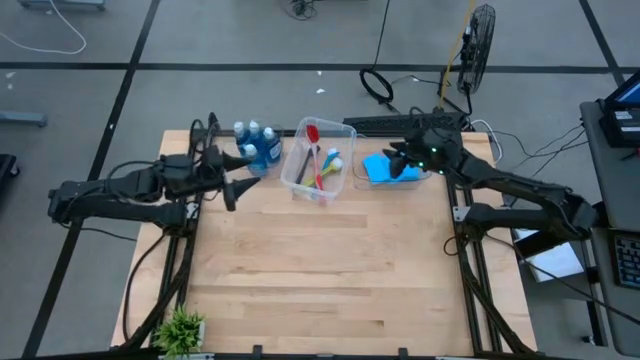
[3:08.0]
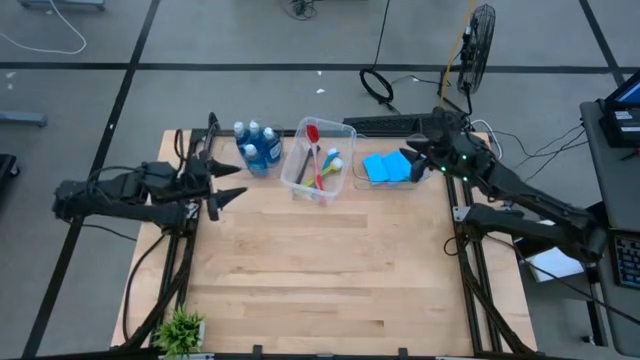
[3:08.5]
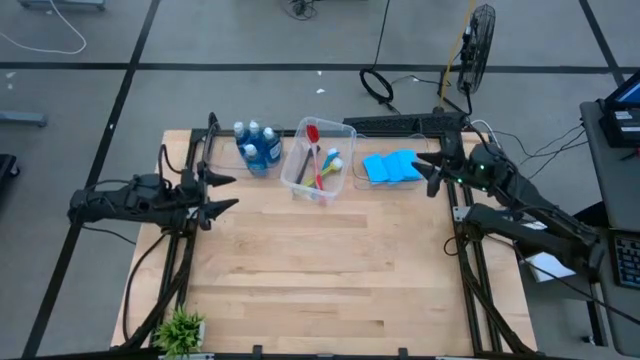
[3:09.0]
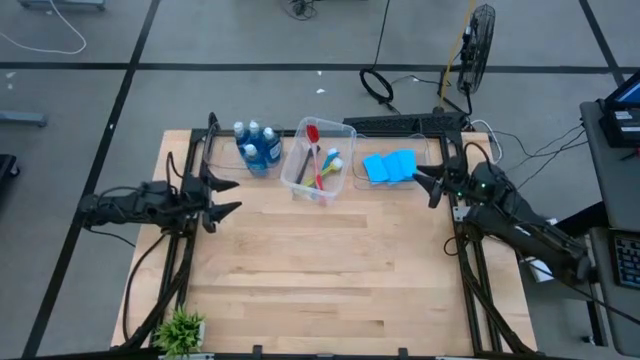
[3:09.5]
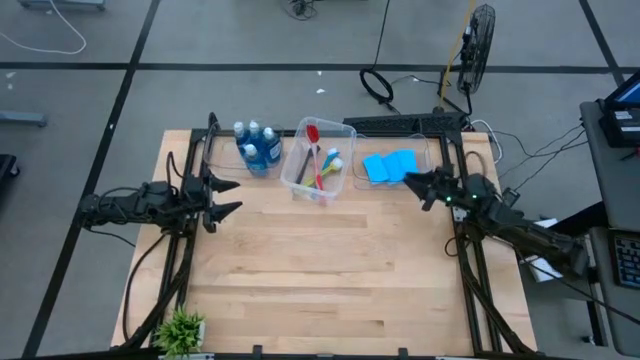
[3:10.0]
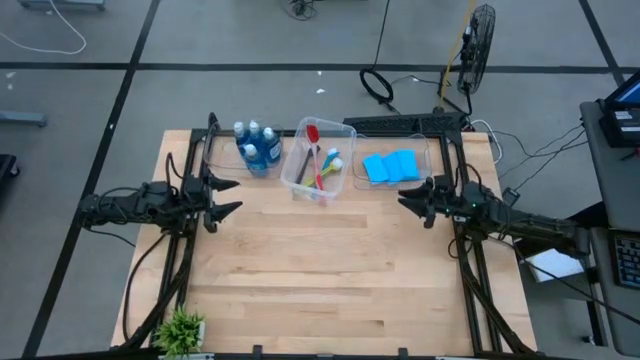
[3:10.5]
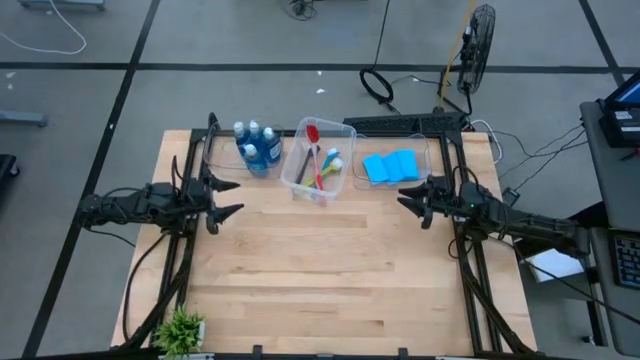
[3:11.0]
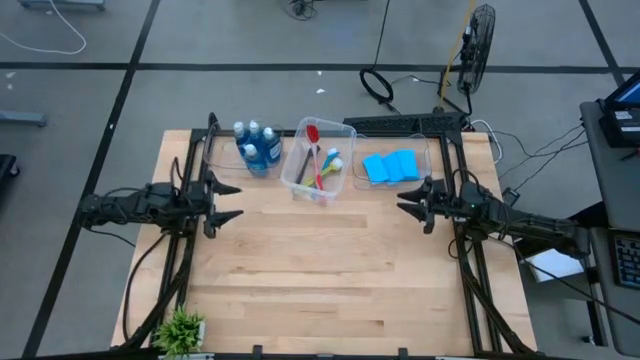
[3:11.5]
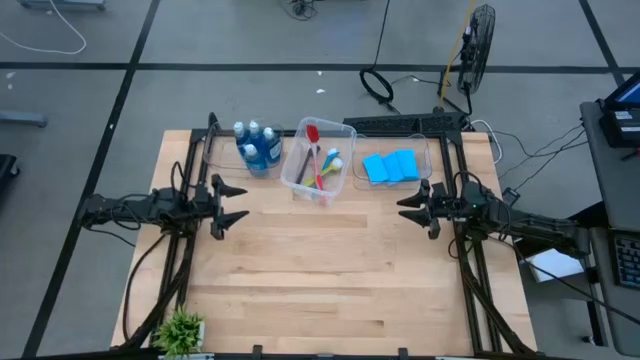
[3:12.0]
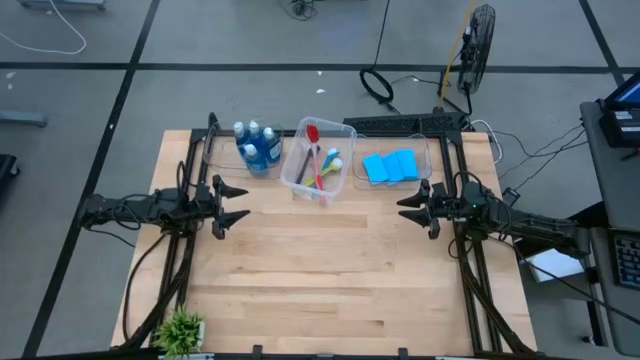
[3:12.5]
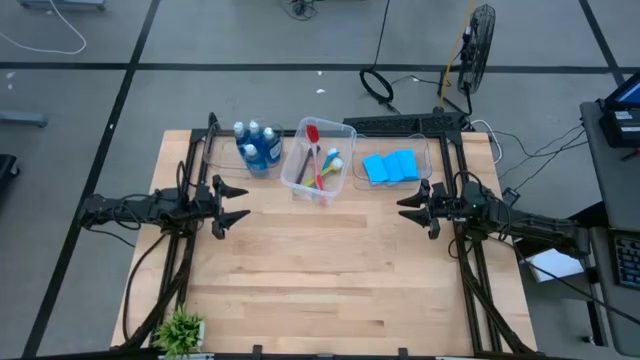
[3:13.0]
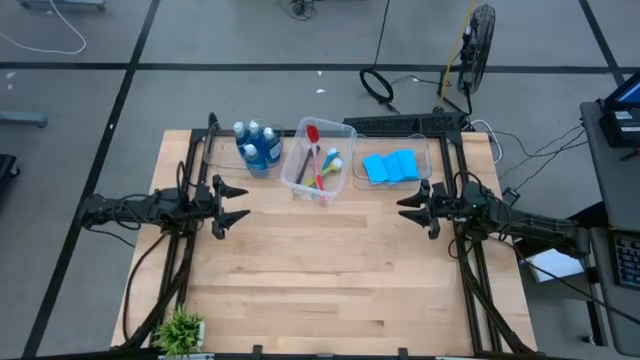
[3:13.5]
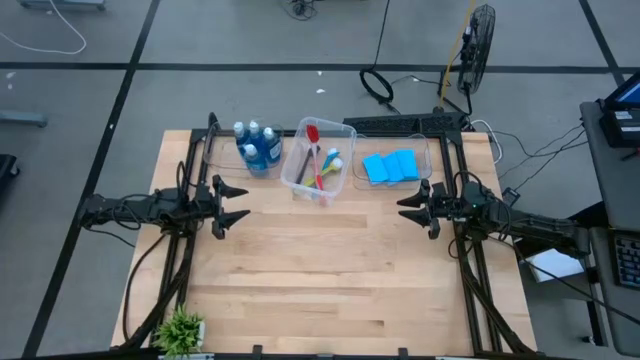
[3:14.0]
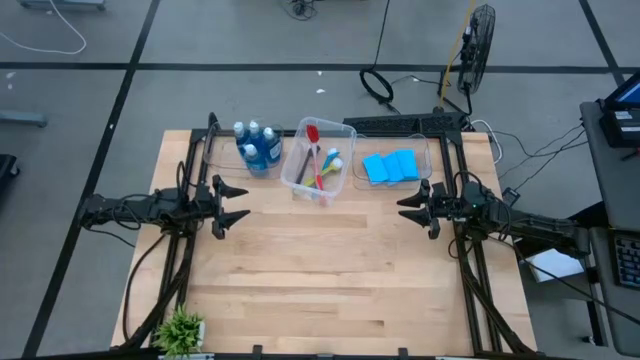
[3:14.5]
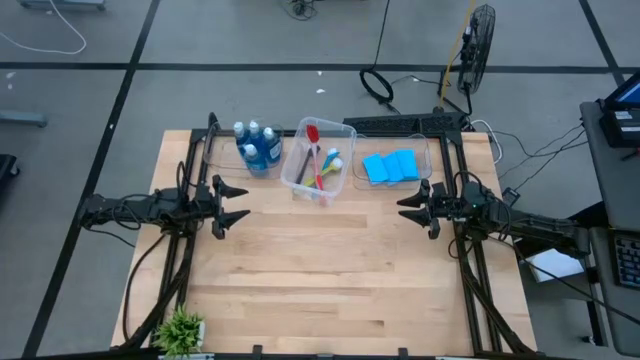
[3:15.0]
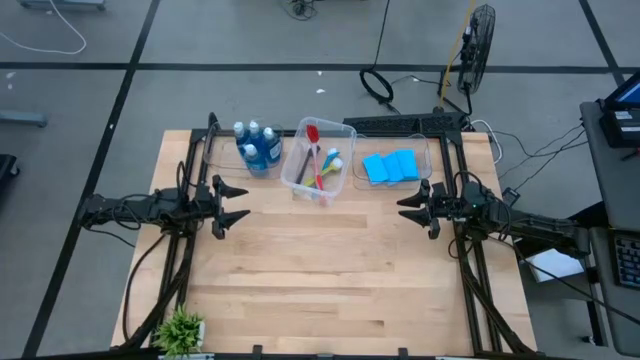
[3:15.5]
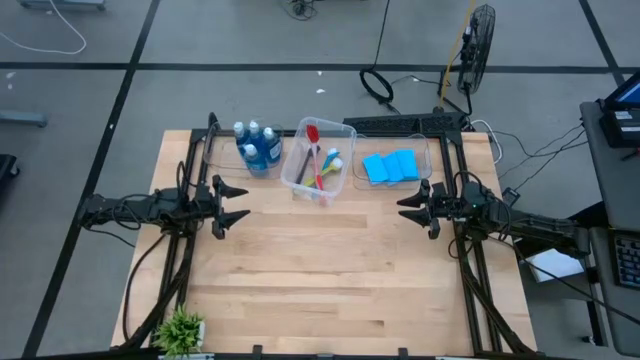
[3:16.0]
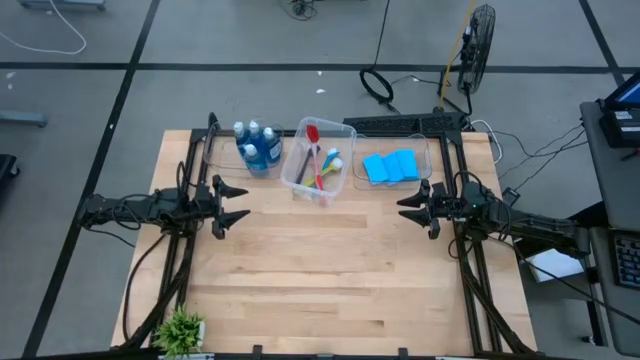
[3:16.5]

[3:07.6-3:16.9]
Task: Pick & Place Kitchen Sink Supplies
Return to Home Position

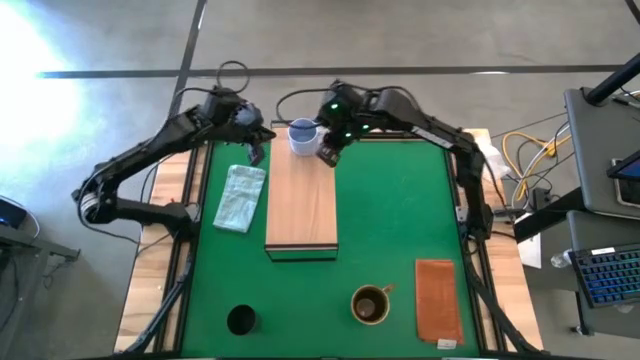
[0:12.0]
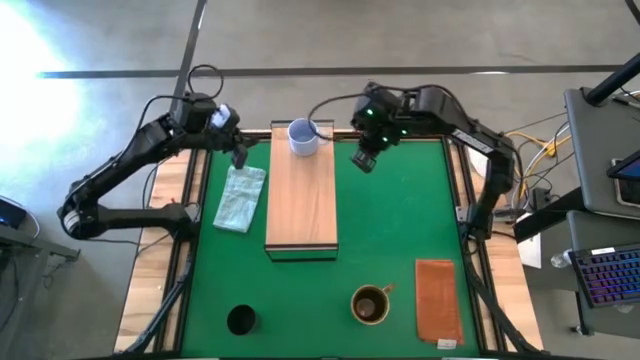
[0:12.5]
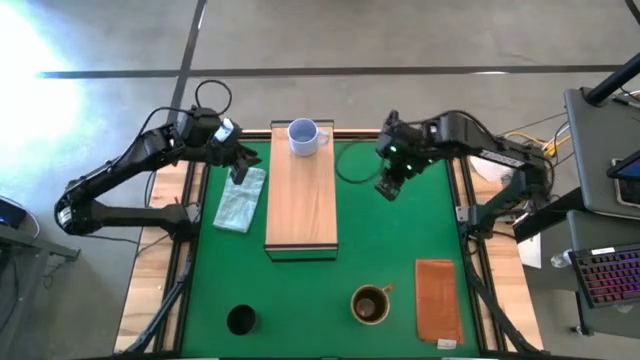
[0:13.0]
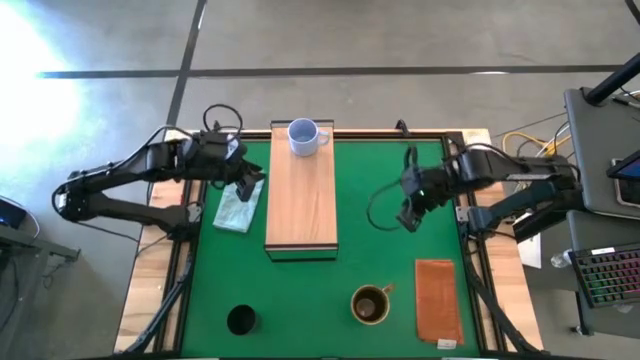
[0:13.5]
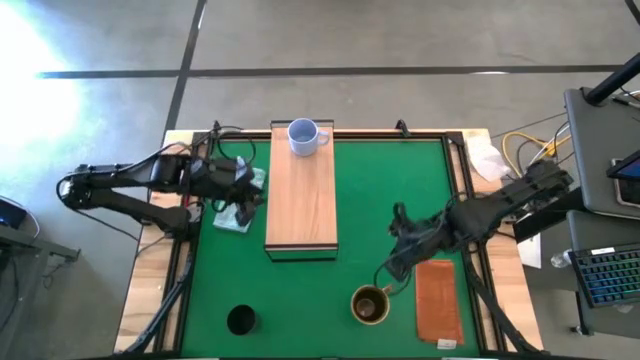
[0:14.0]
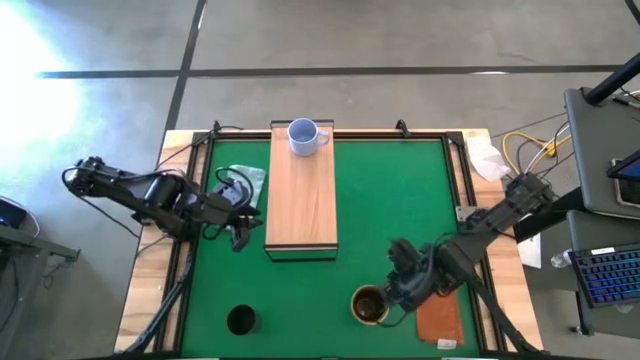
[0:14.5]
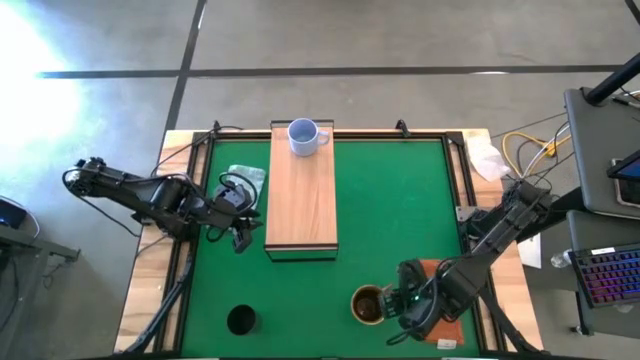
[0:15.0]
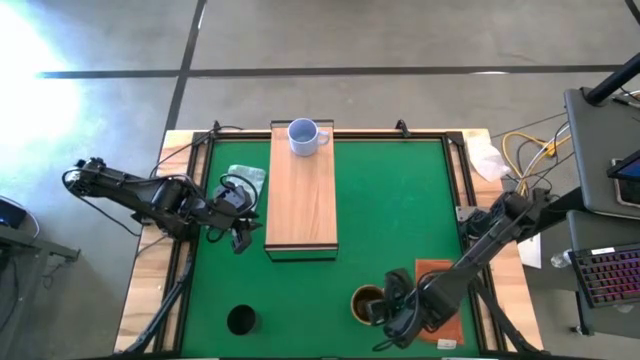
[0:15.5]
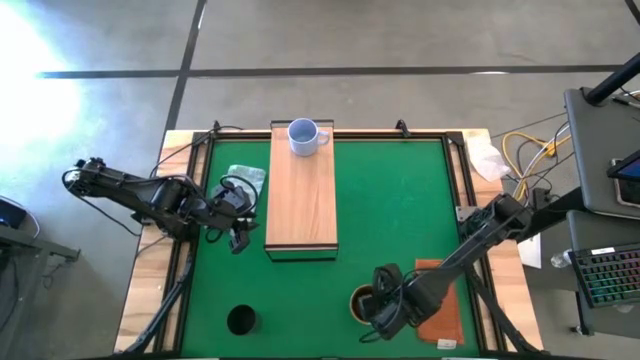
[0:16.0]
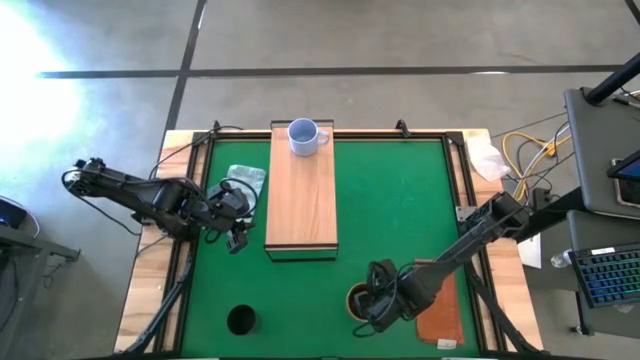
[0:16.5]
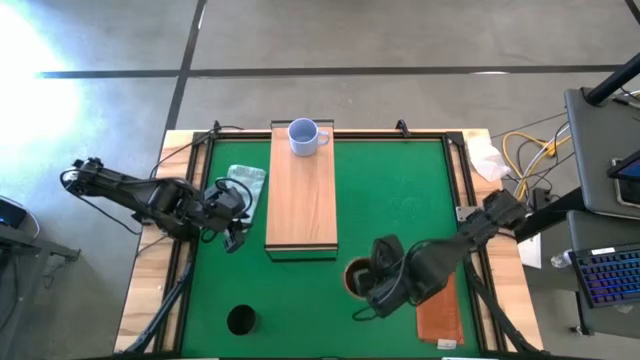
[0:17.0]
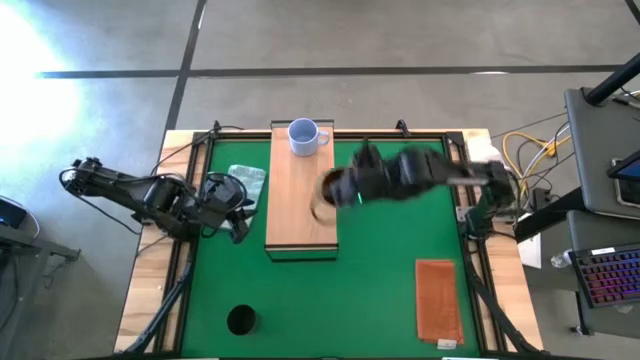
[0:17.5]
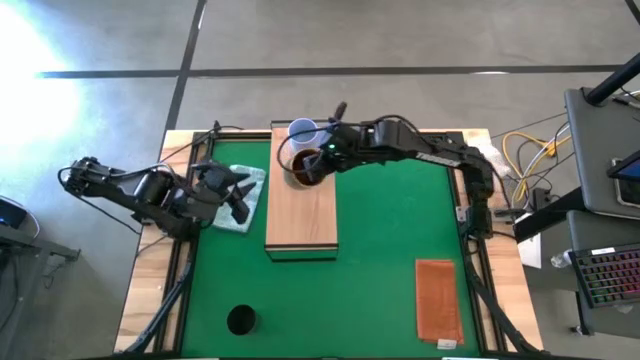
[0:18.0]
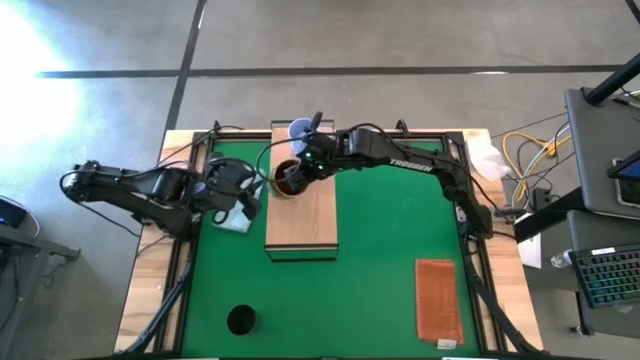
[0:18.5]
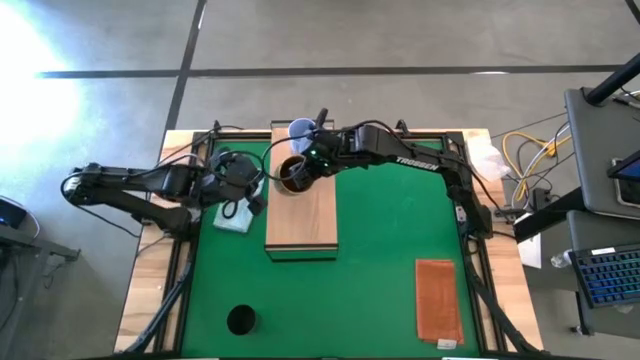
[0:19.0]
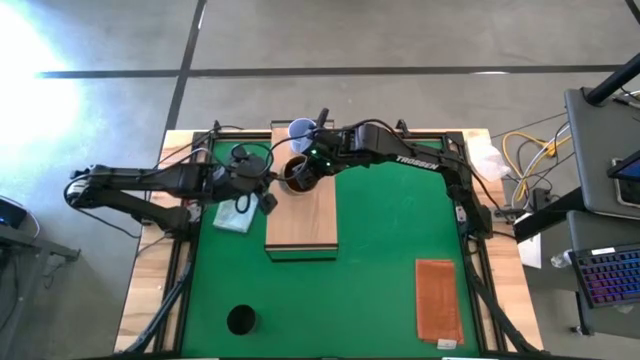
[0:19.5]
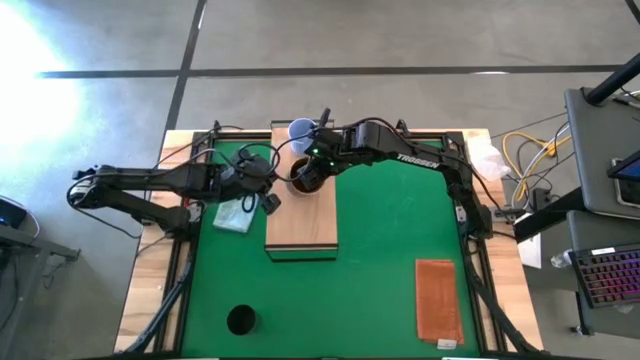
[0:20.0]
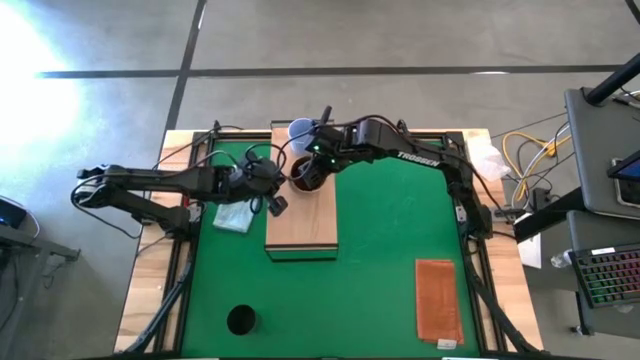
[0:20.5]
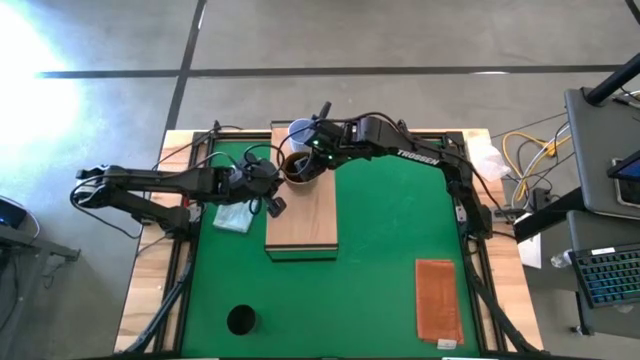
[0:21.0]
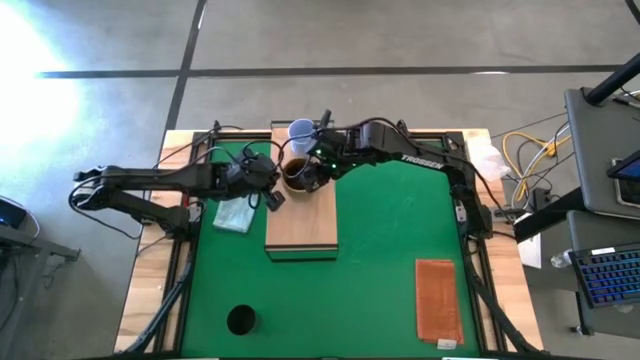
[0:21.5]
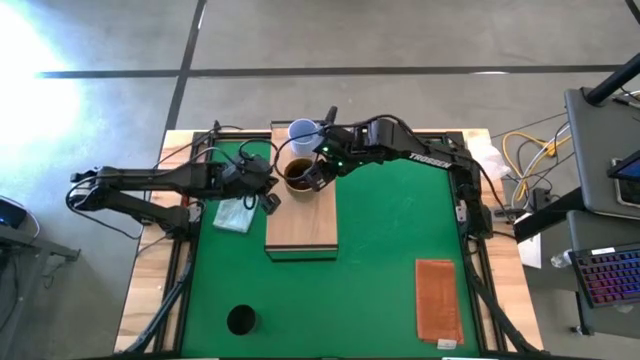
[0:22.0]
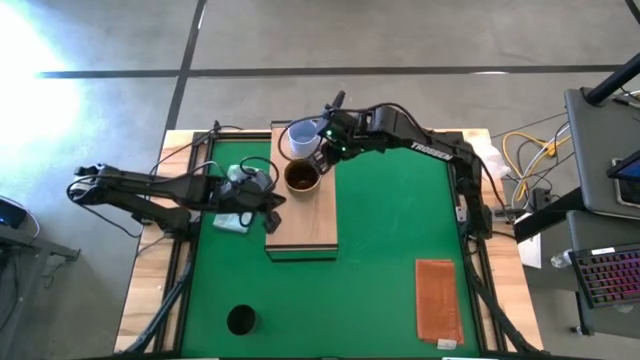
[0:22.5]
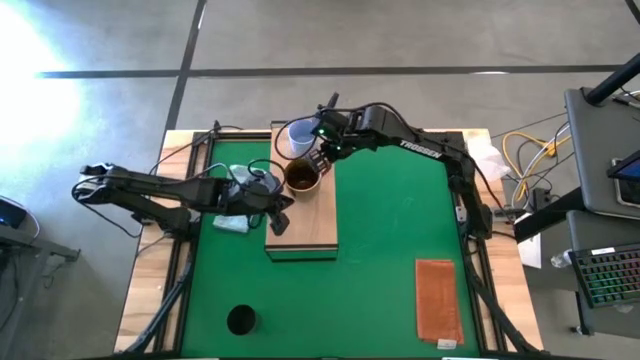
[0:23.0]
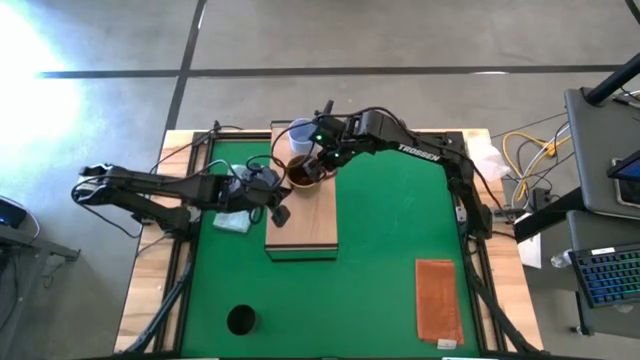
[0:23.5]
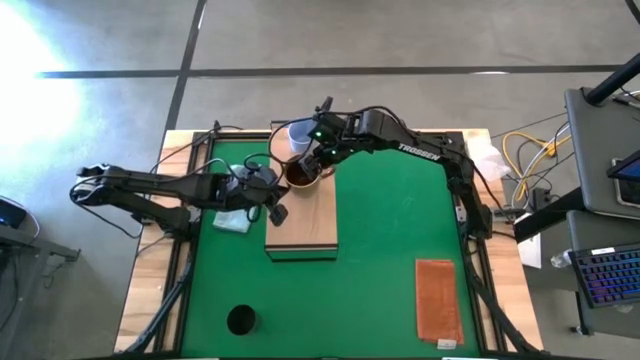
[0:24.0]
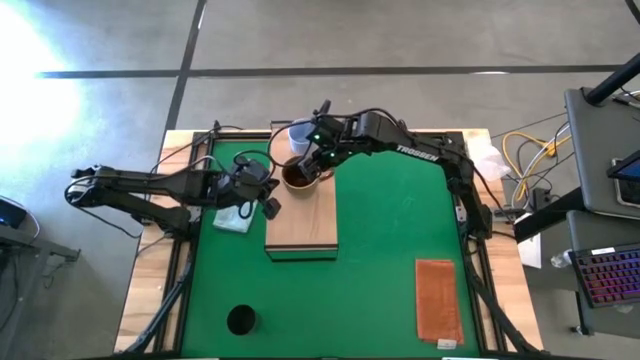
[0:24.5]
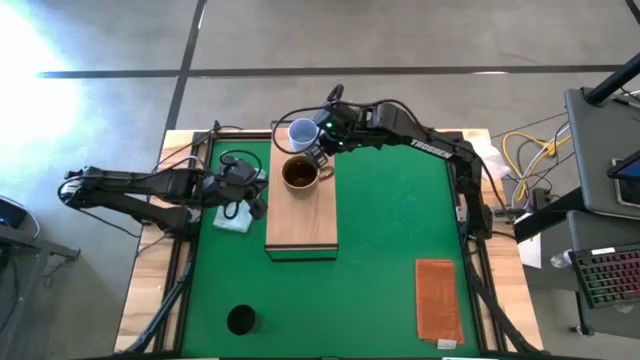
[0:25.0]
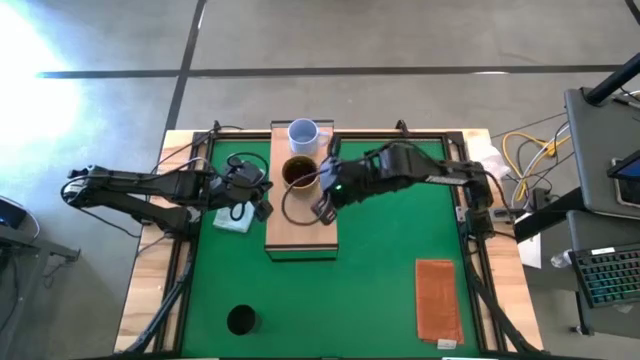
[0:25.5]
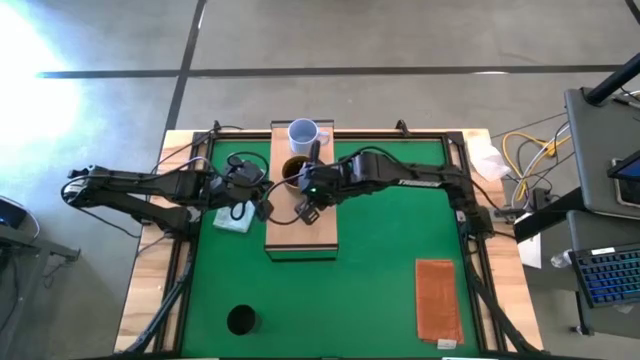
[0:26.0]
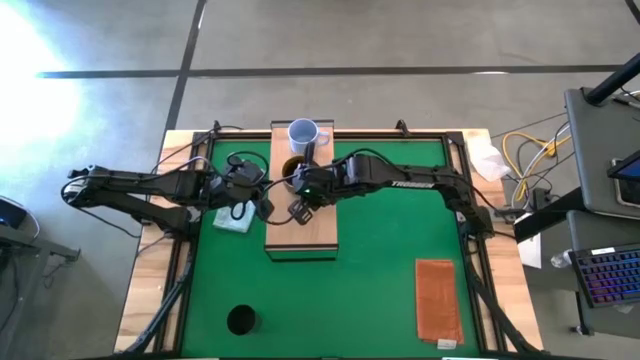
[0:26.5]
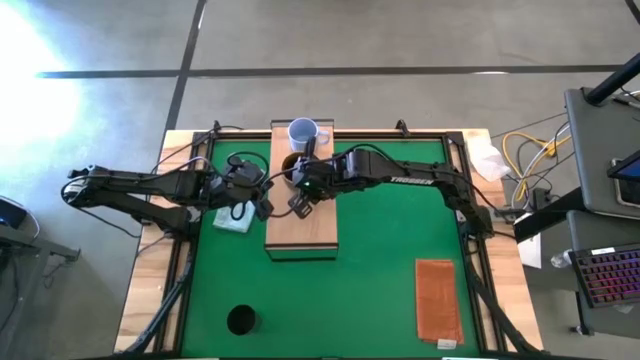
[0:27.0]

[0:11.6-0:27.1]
Task: Stack small to large cups/mugs on shelf
Put the green mug on the shelf
